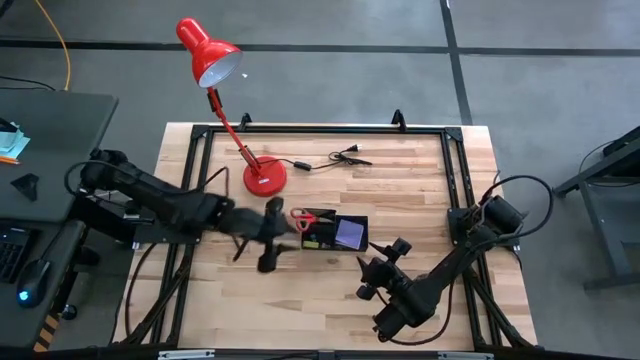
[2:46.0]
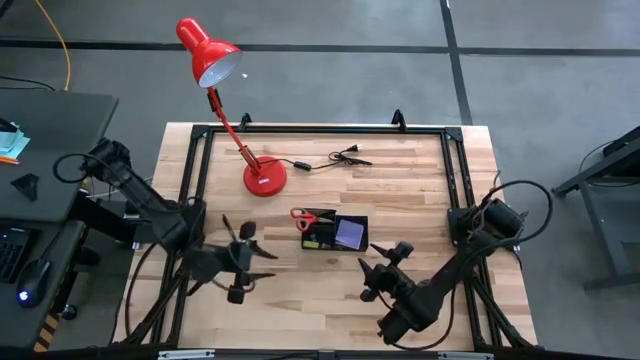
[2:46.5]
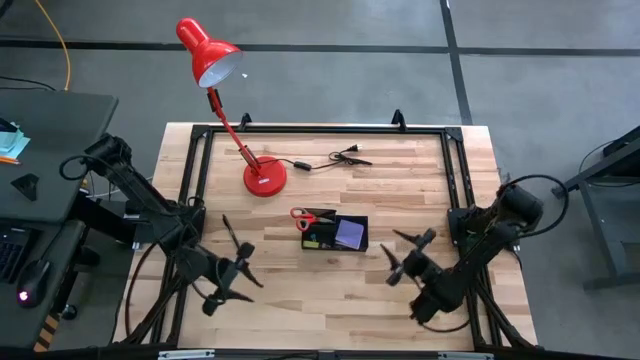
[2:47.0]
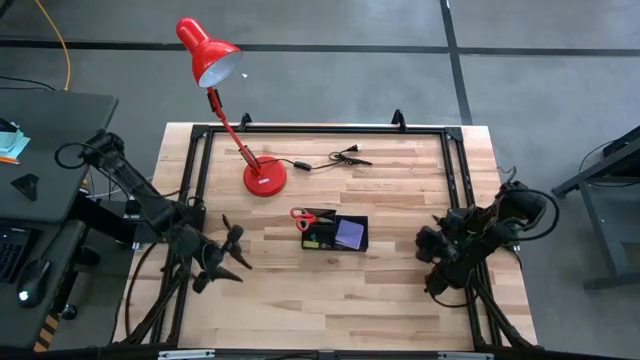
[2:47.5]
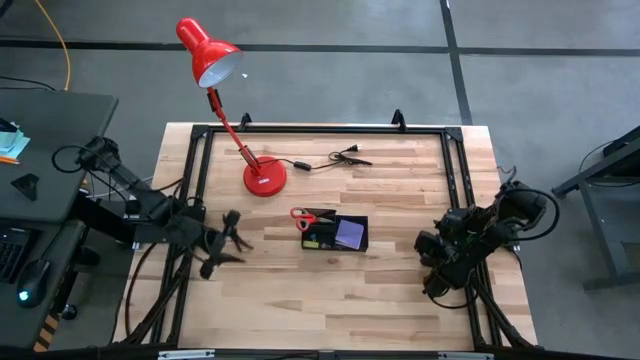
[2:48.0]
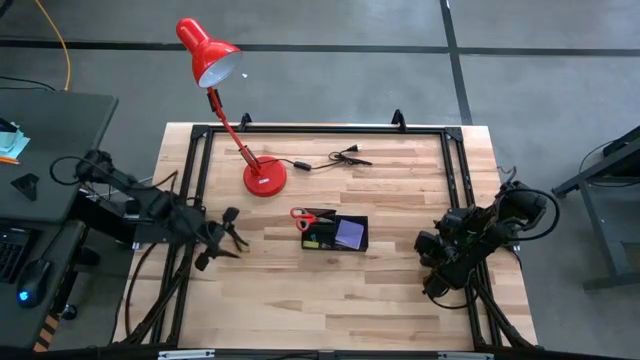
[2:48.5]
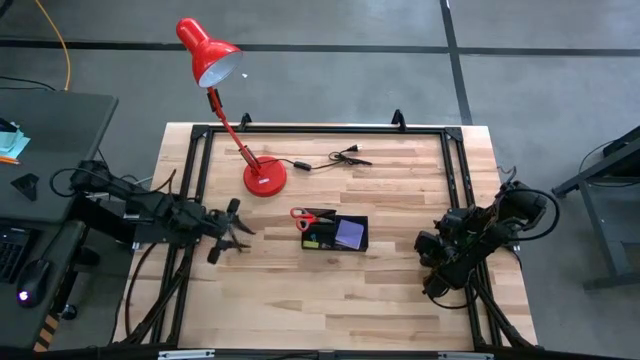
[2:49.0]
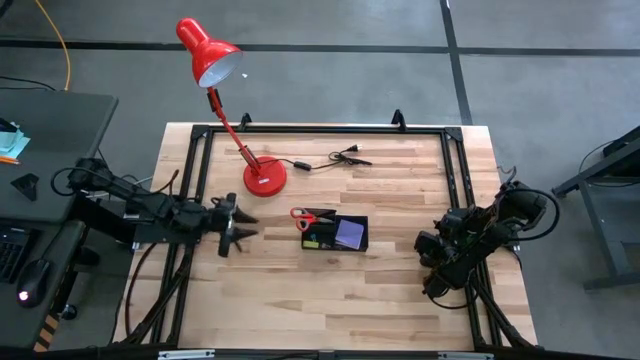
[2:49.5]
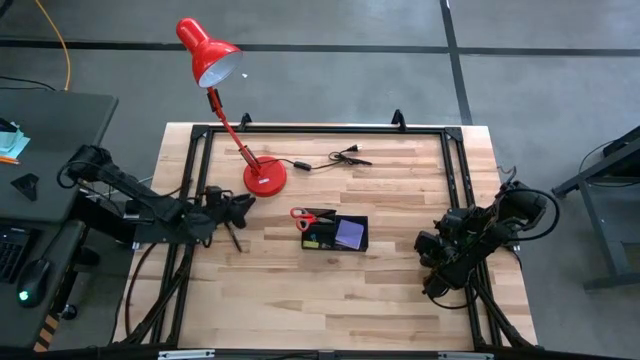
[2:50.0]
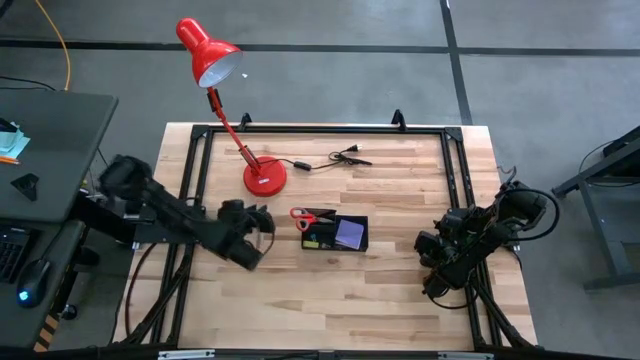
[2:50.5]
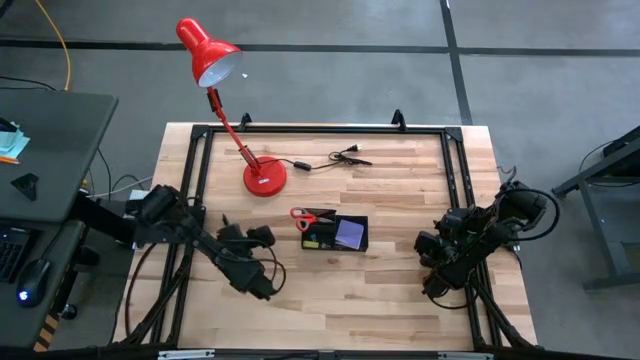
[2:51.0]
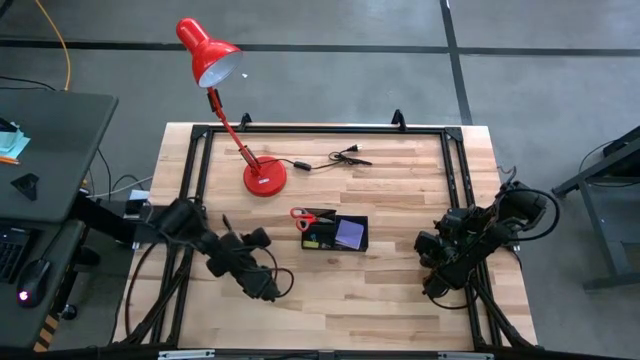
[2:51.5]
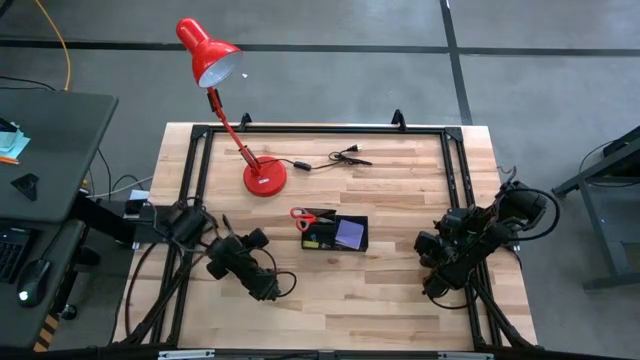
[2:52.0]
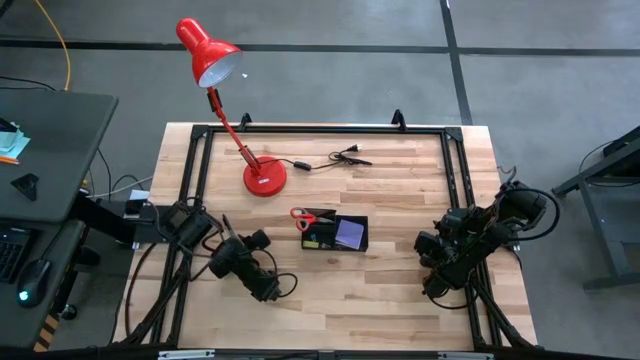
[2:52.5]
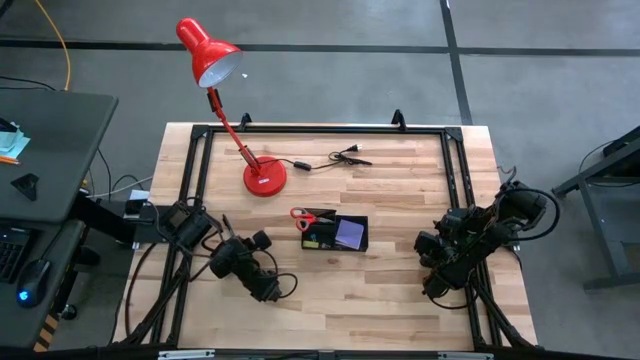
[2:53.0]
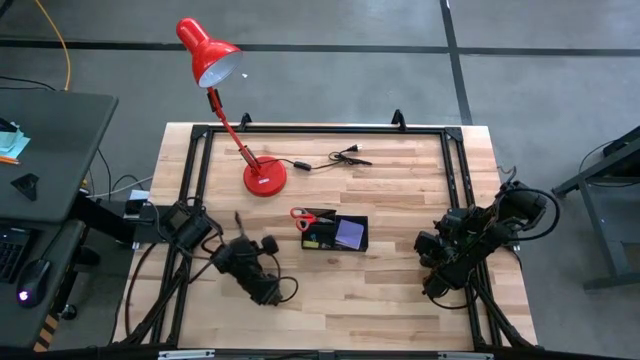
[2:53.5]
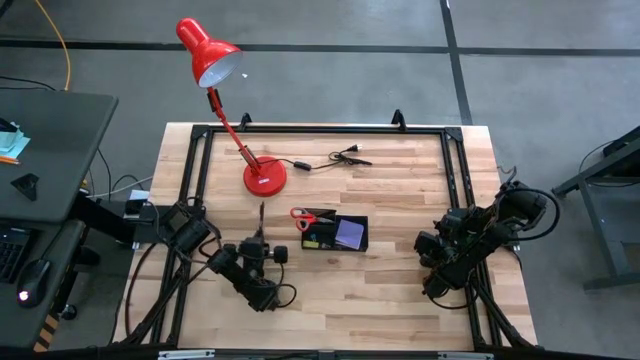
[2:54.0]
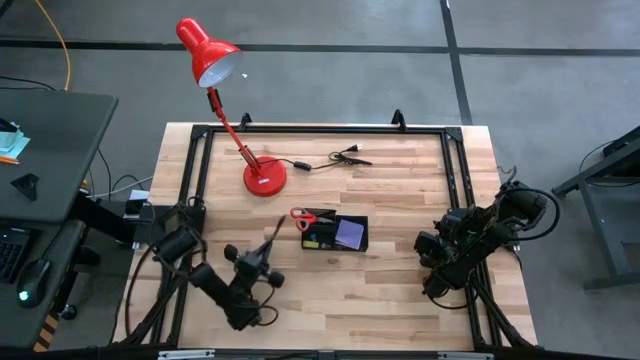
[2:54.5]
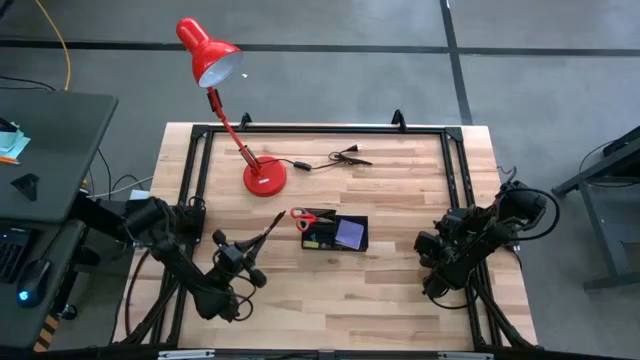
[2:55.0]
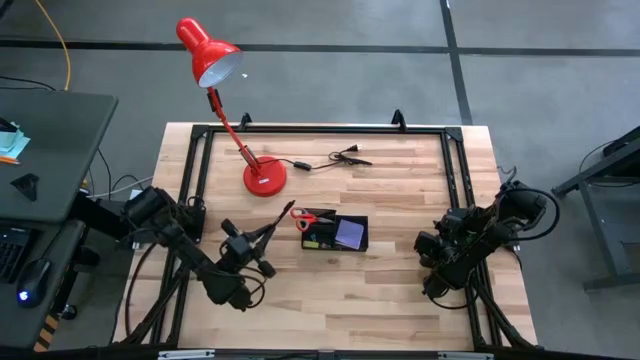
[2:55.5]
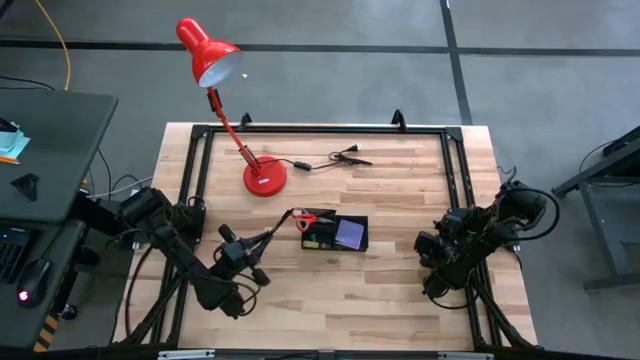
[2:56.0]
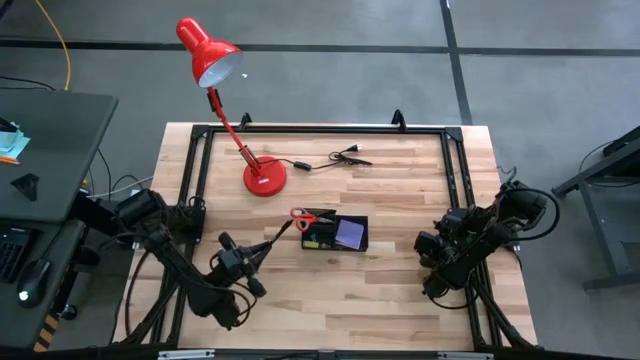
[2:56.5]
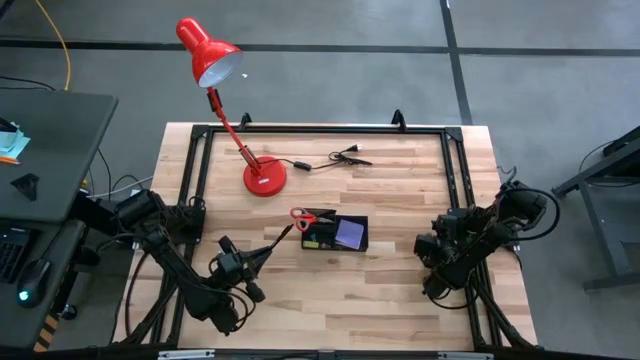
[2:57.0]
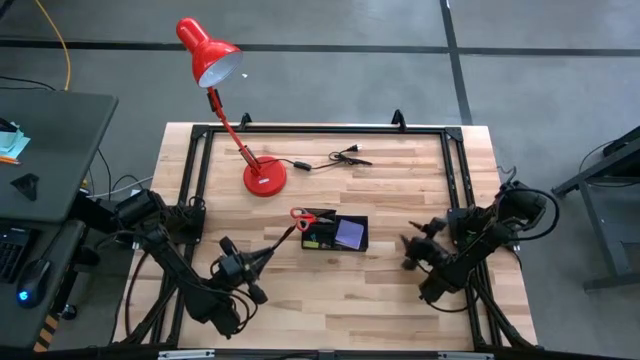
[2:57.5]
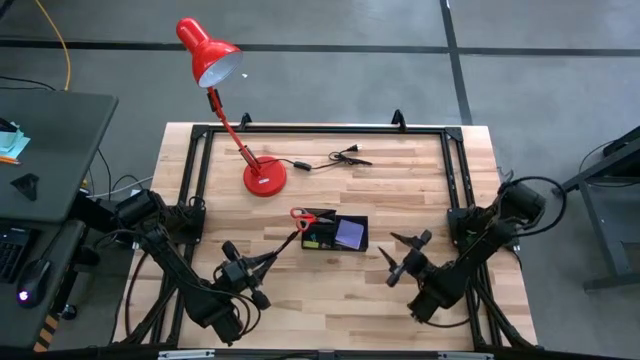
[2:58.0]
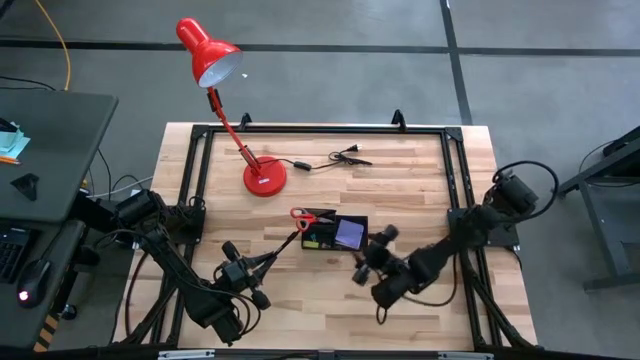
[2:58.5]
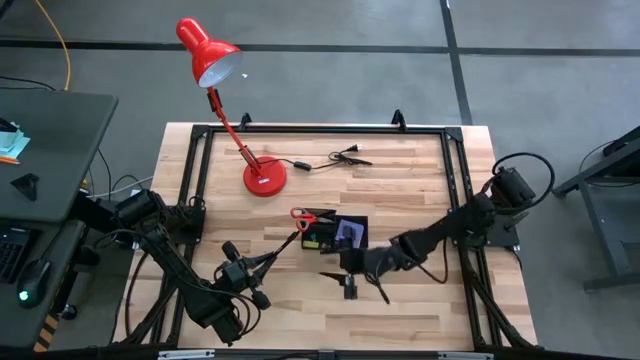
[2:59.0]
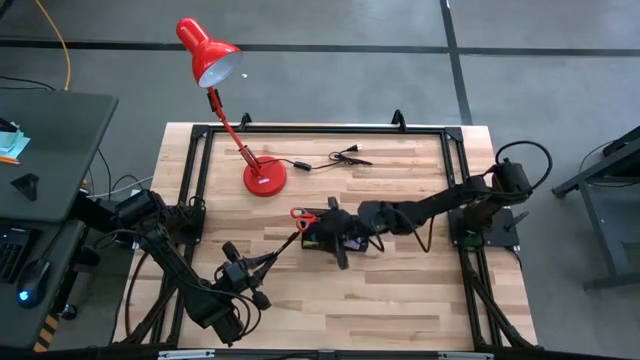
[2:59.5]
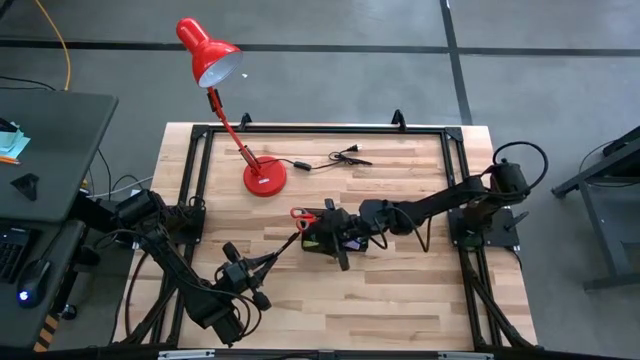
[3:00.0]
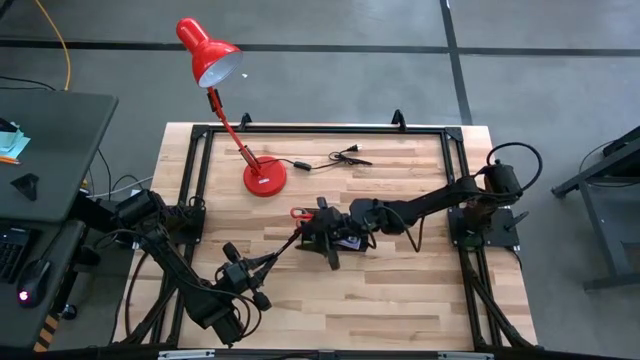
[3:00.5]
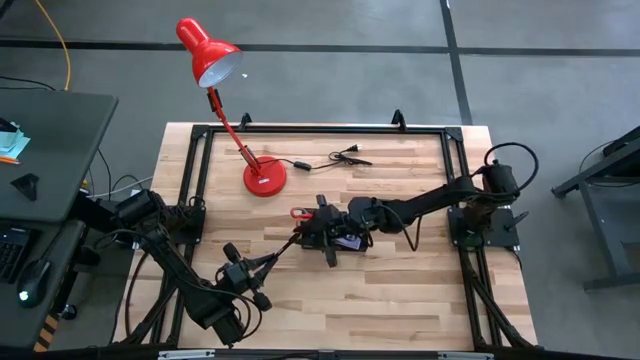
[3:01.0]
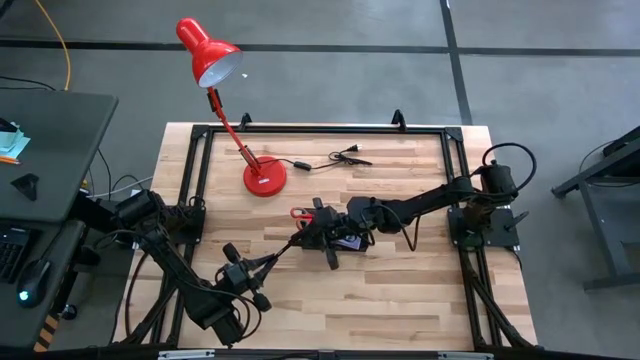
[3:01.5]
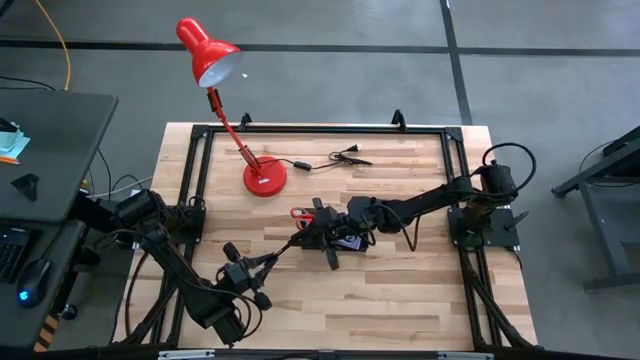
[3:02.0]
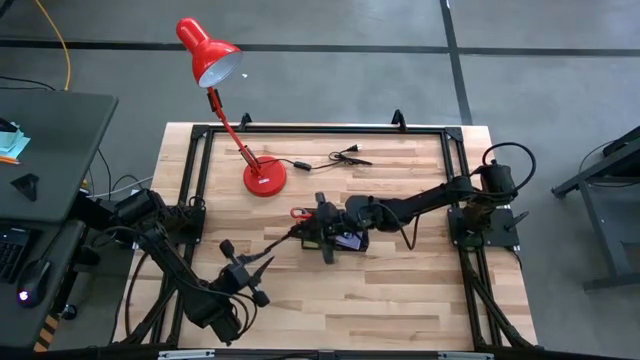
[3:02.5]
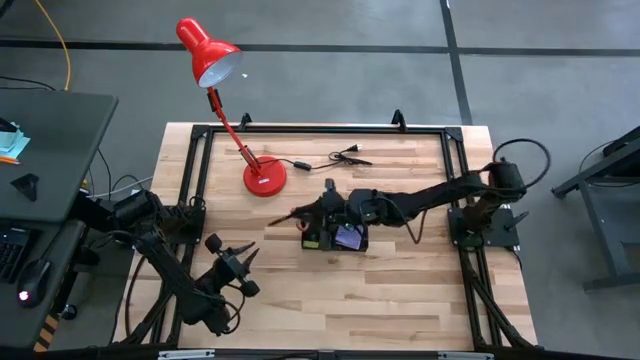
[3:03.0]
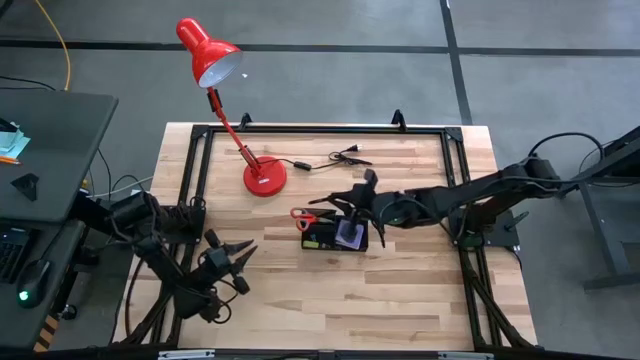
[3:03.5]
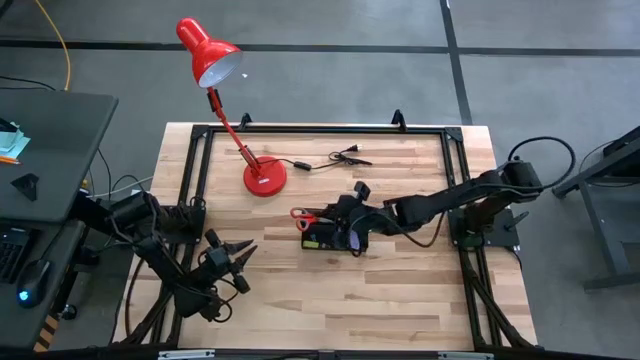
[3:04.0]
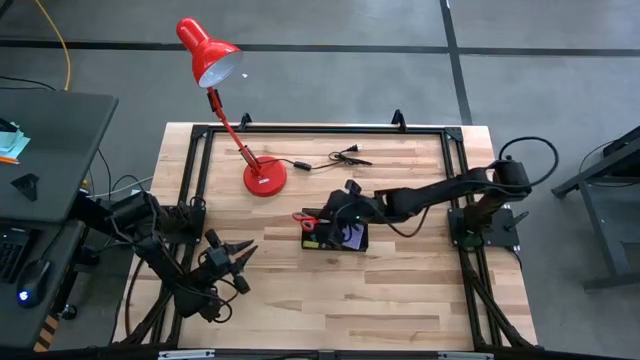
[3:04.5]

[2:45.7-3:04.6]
Task: Pick and place office supplies into organizer
Put the black pen into the black desk organizer

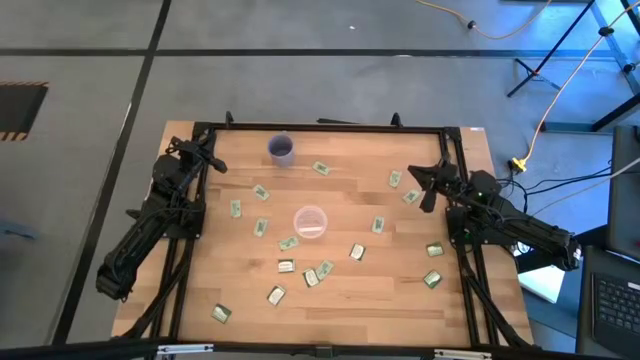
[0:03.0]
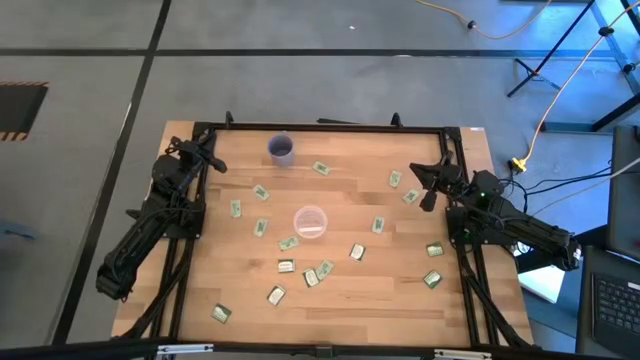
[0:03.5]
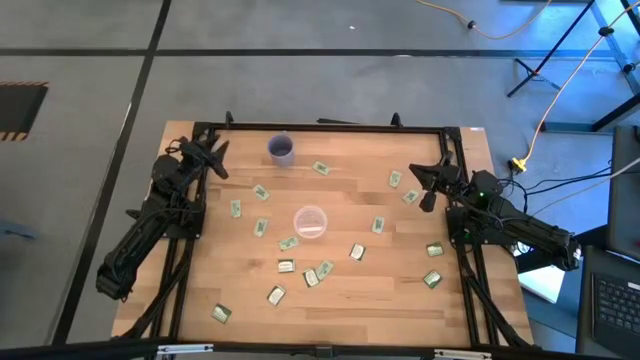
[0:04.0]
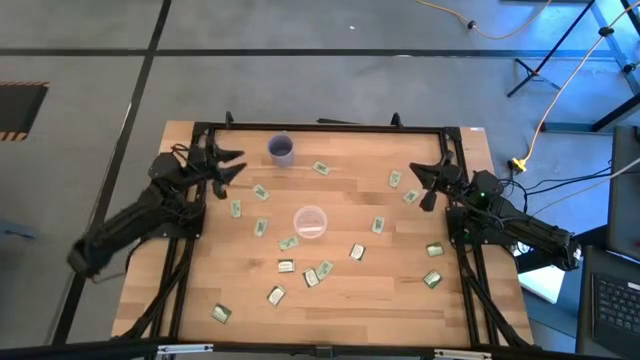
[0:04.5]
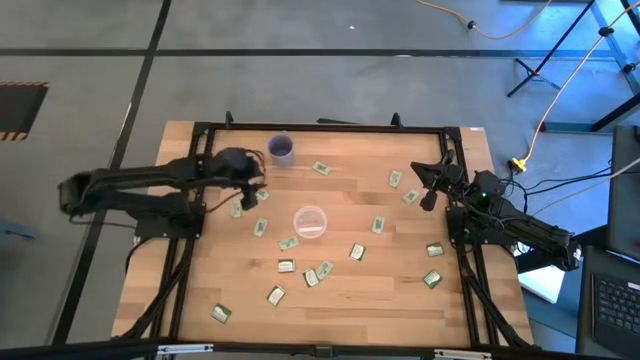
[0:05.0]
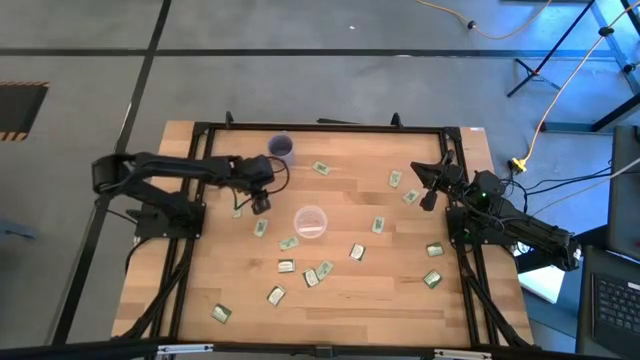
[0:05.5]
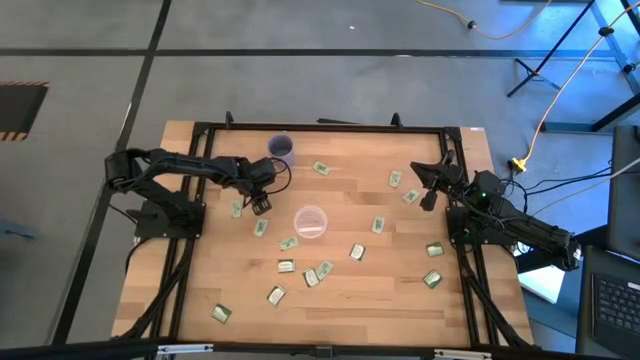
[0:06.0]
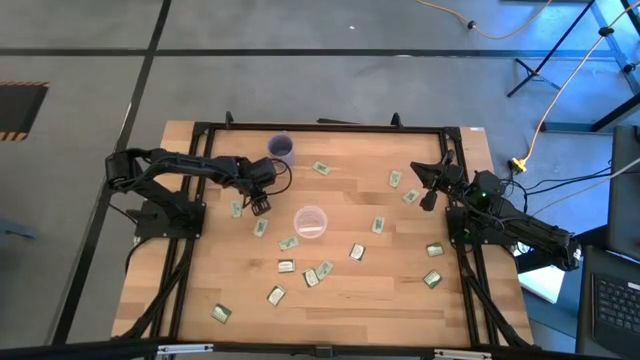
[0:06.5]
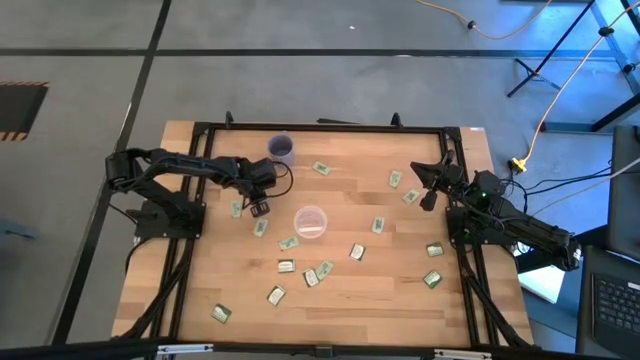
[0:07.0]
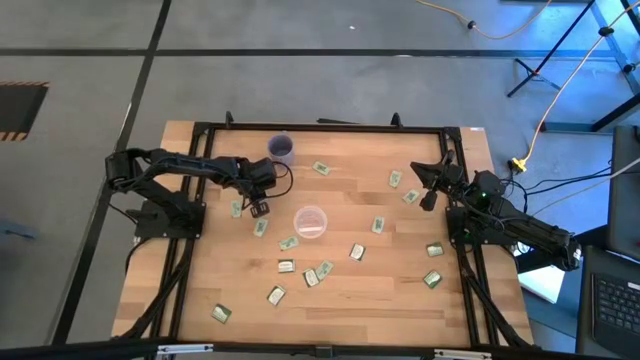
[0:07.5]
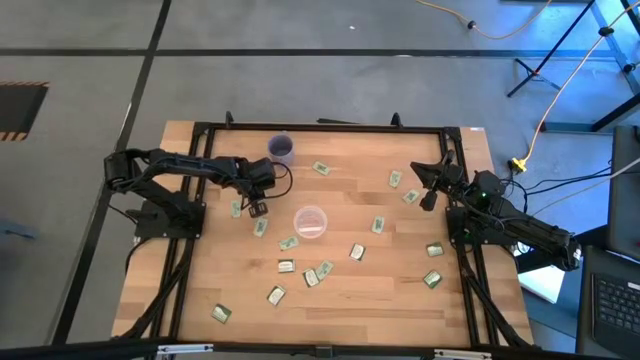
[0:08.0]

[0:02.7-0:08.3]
Task: Pick and place Stevia / Truvia into bins
Put the stevia packet into the transparent container
